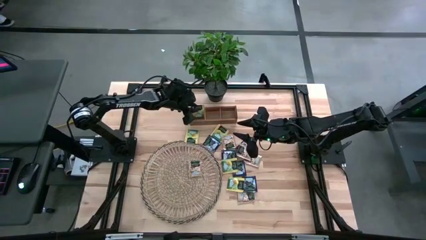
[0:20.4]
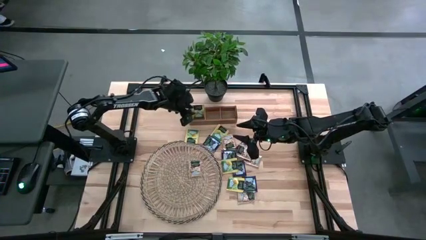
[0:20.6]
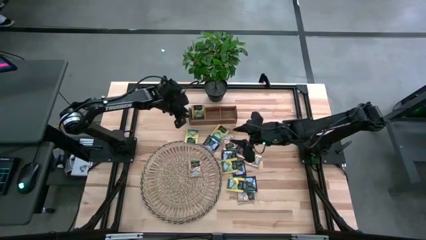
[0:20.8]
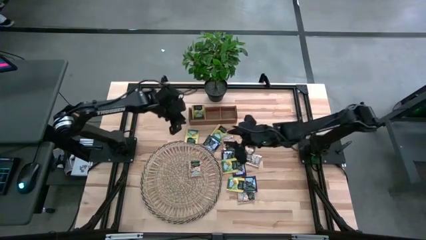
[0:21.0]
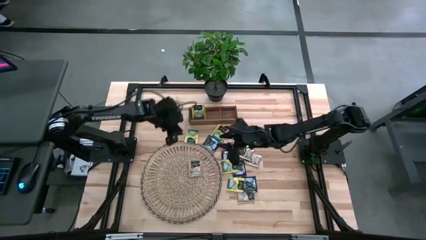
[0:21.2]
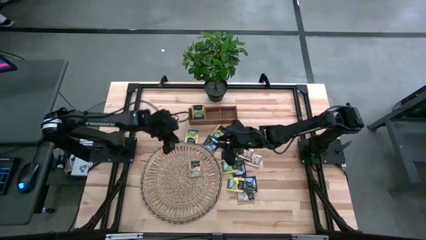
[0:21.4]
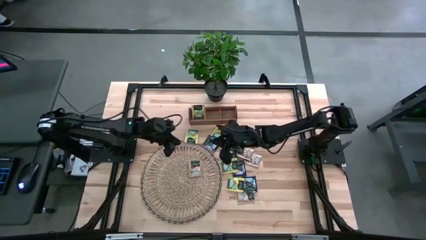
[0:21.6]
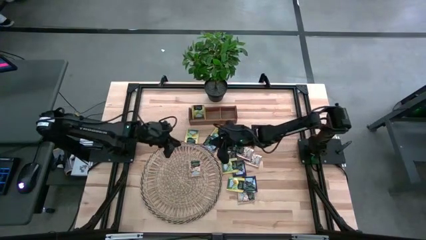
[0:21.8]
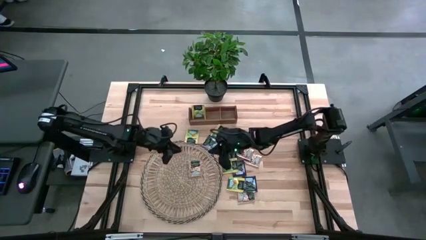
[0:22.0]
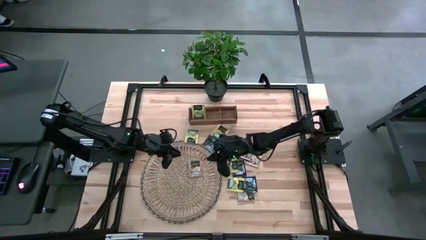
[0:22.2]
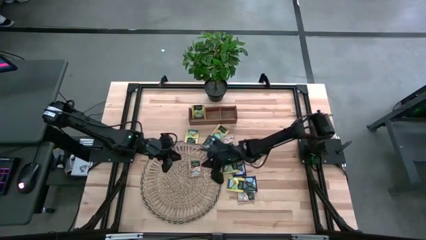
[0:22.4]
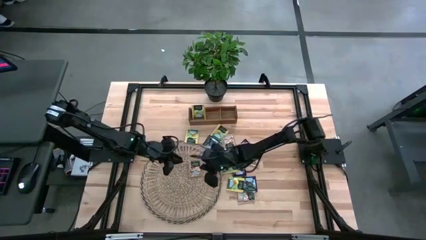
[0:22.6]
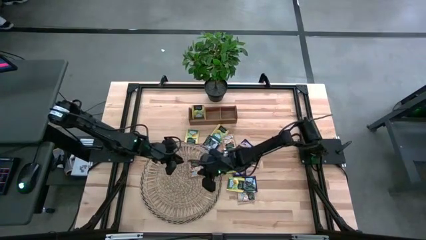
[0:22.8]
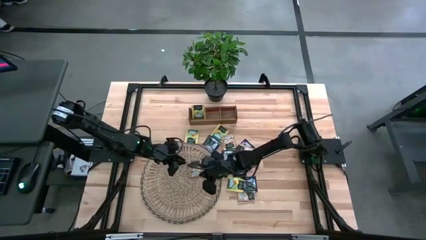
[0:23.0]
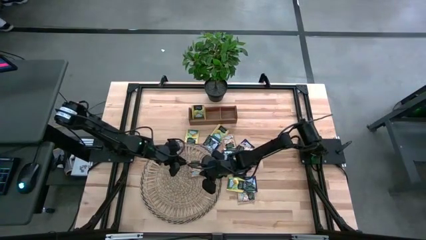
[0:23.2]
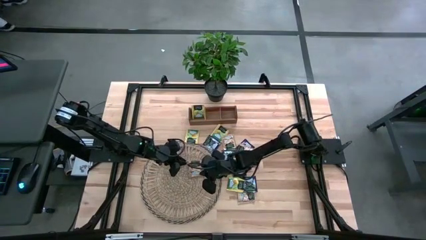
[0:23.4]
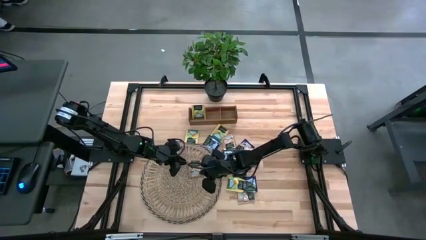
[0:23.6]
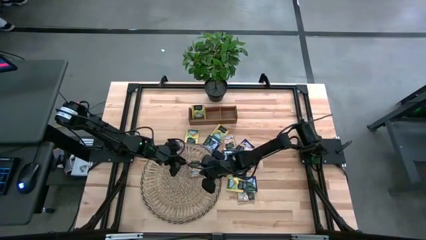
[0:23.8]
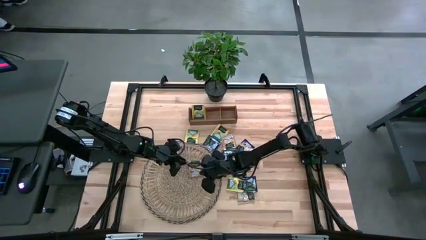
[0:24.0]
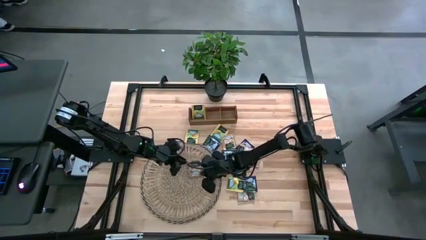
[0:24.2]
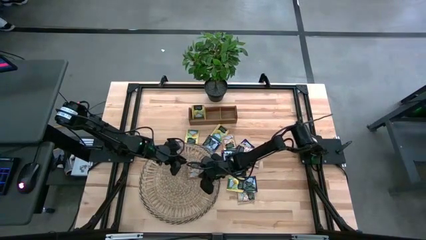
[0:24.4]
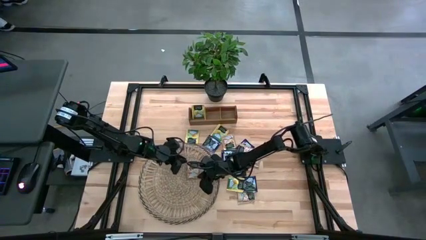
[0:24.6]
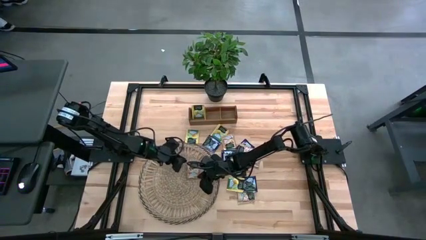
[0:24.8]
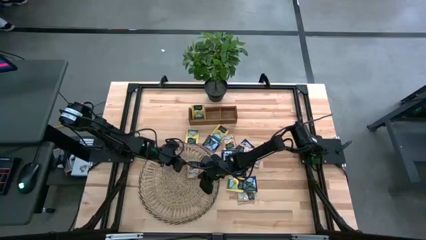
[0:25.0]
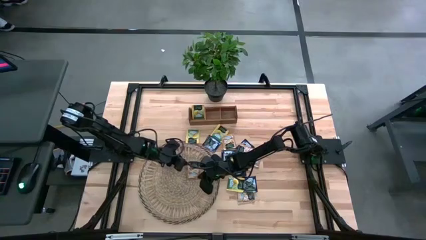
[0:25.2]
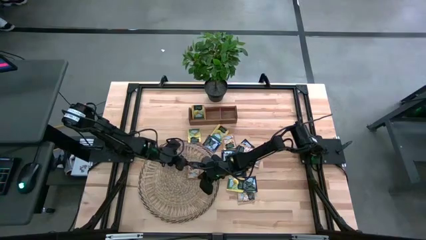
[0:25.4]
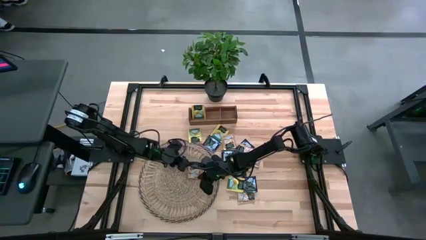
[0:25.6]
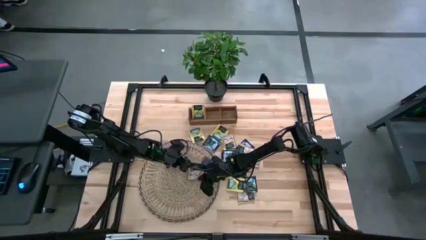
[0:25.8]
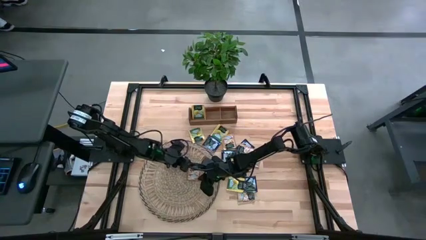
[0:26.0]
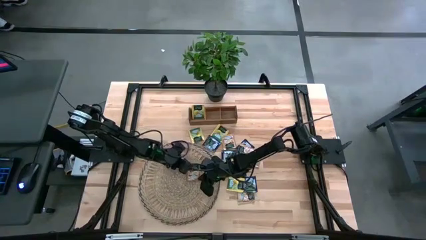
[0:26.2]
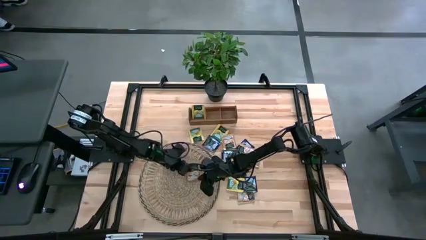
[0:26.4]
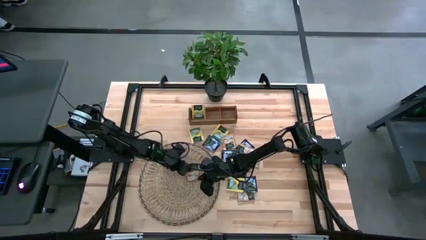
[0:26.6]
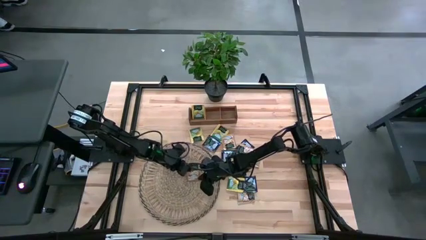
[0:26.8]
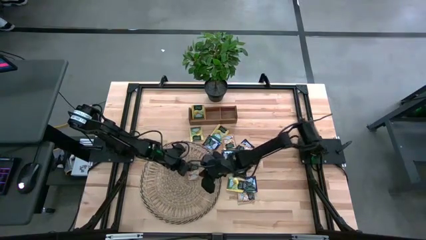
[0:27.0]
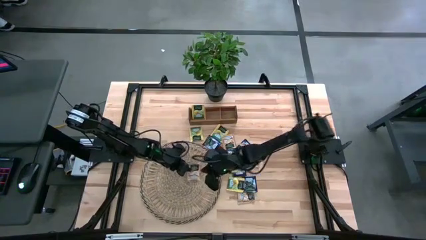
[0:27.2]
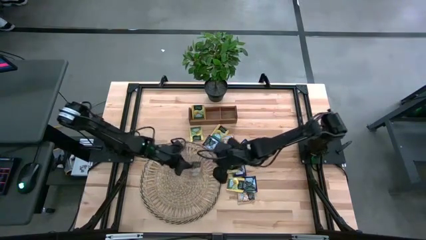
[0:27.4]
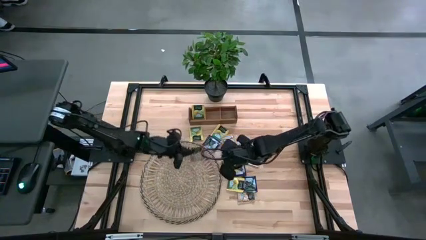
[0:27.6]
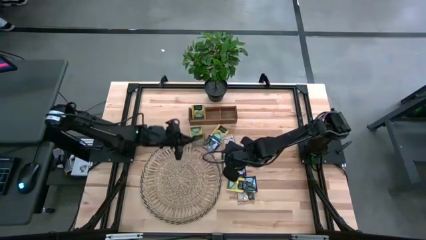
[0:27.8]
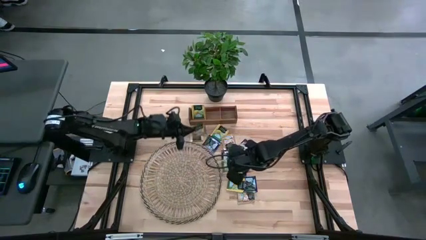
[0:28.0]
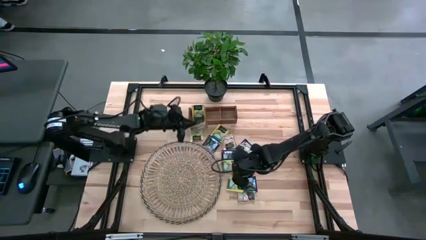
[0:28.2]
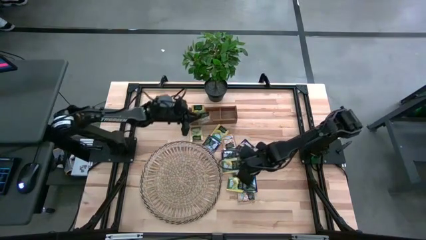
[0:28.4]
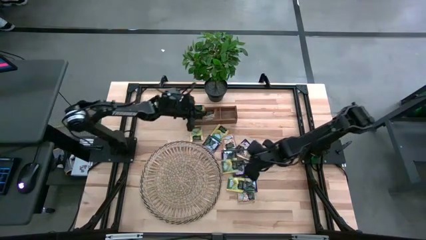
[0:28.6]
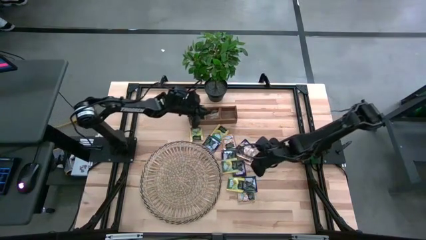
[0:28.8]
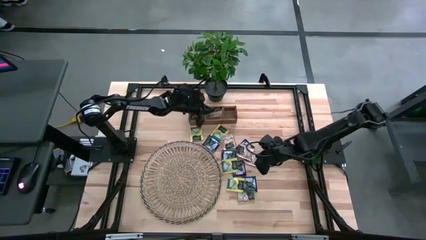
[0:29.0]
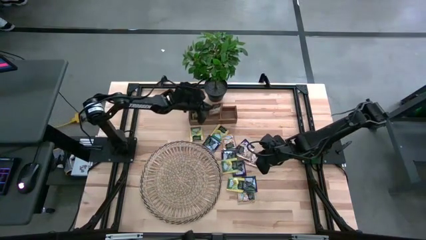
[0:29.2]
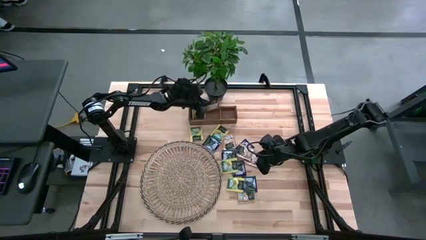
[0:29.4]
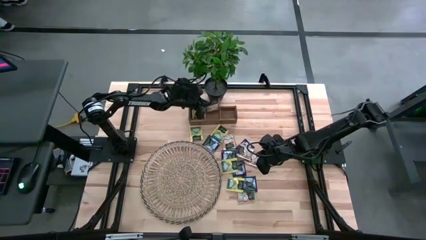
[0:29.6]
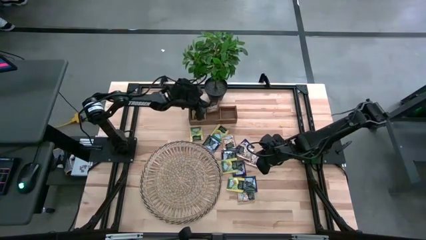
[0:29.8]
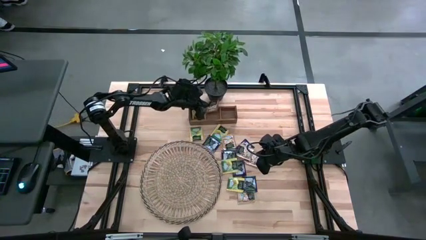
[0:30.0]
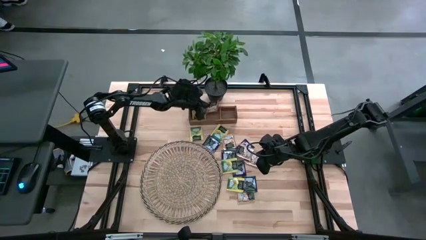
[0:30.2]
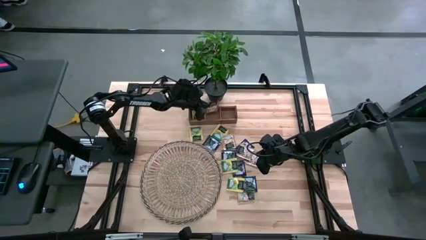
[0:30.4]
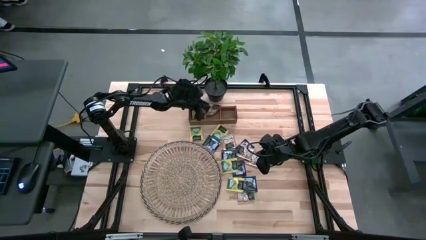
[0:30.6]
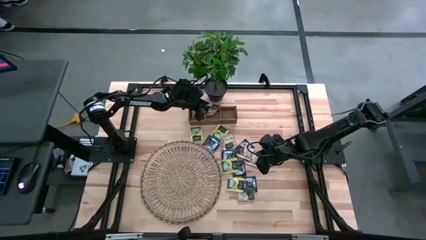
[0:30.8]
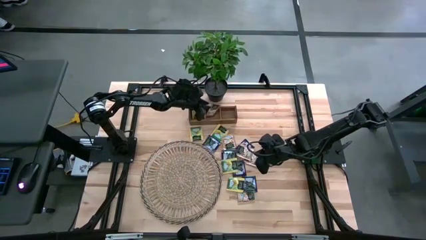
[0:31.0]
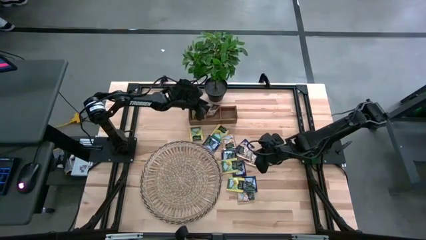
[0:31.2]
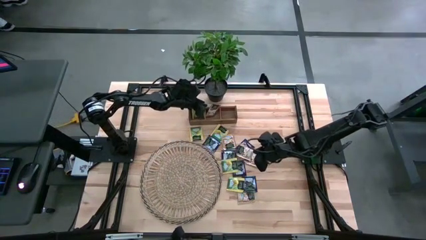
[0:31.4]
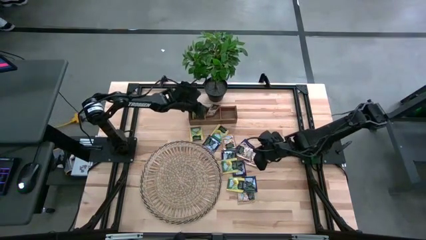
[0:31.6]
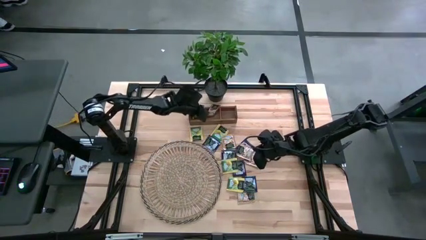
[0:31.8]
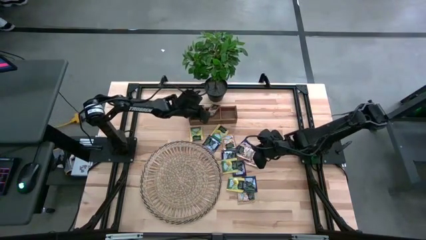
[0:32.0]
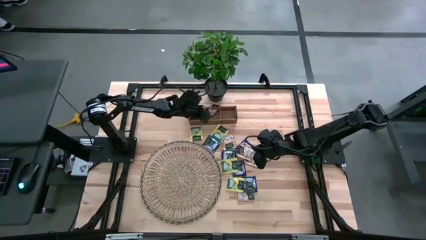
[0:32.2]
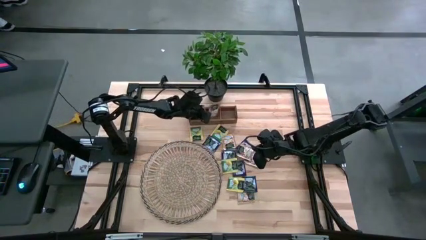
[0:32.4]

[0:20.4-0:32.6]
Task: Pick & Place Tea
Put the brown tea bag into the middle section of the wooden organizer
